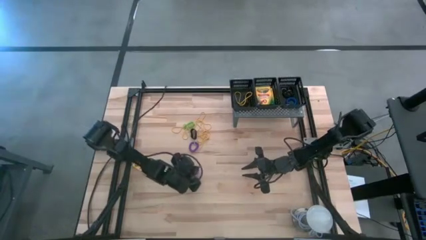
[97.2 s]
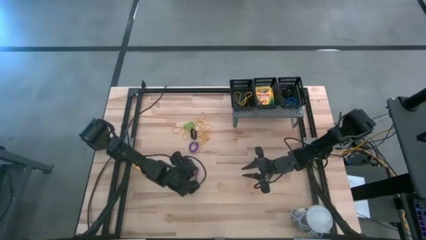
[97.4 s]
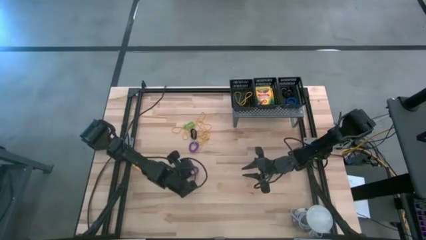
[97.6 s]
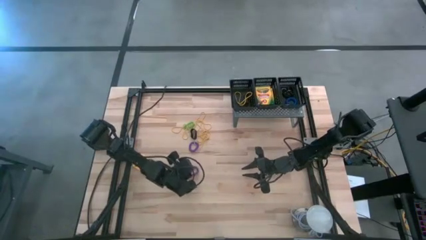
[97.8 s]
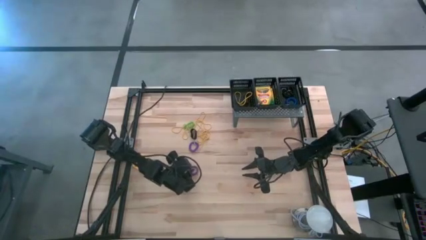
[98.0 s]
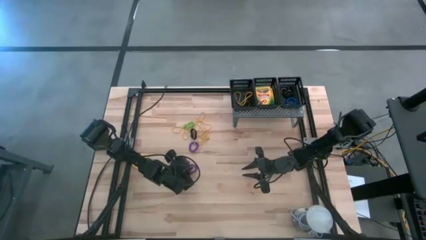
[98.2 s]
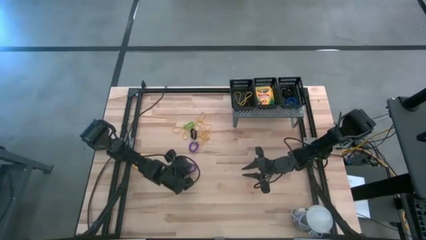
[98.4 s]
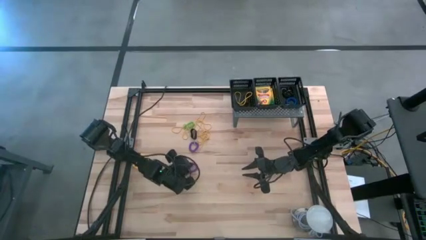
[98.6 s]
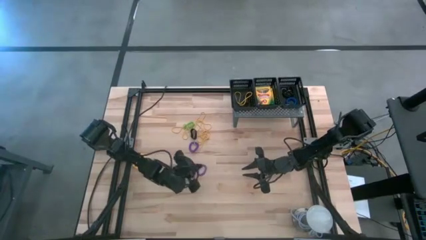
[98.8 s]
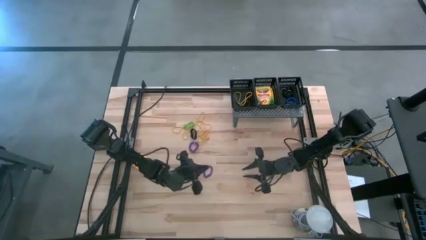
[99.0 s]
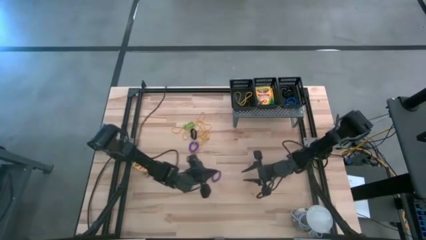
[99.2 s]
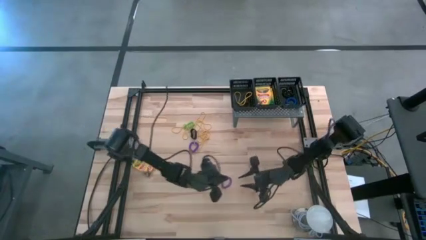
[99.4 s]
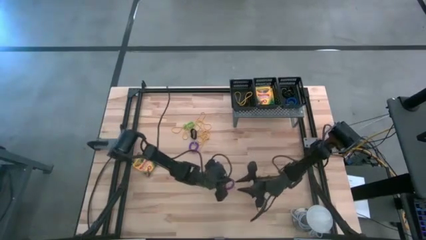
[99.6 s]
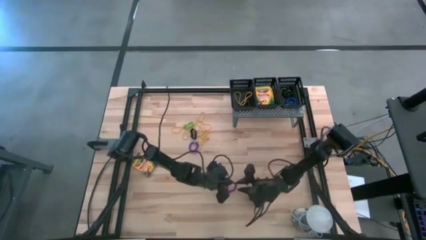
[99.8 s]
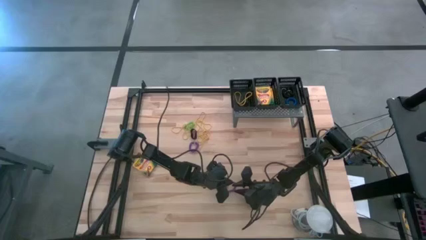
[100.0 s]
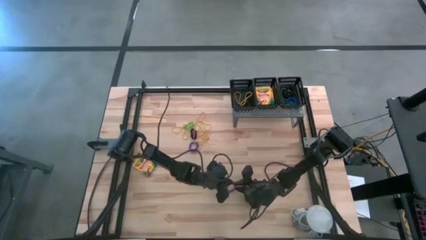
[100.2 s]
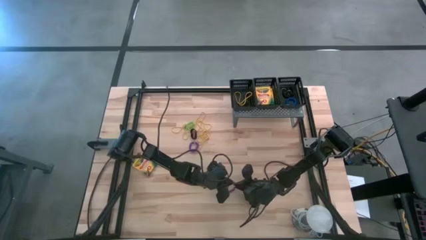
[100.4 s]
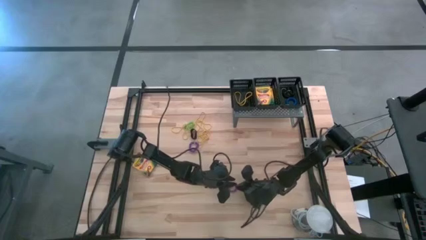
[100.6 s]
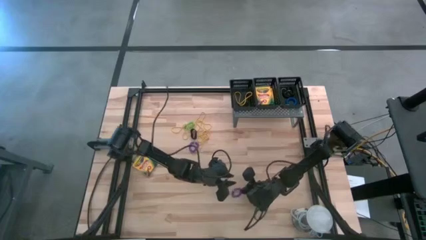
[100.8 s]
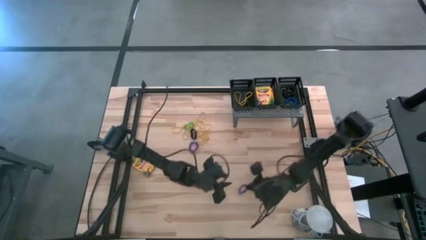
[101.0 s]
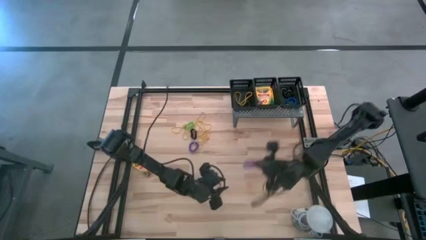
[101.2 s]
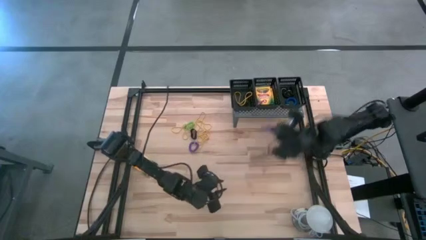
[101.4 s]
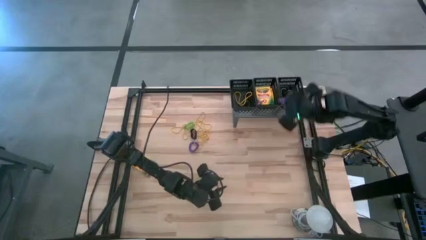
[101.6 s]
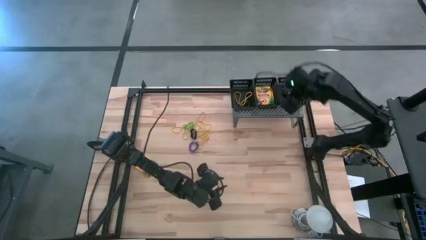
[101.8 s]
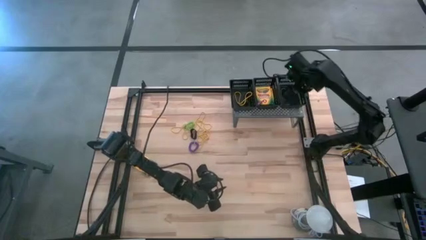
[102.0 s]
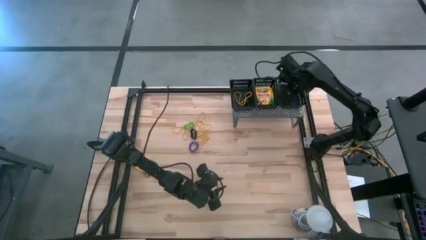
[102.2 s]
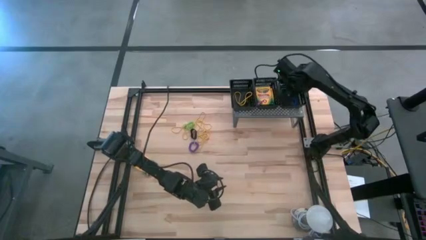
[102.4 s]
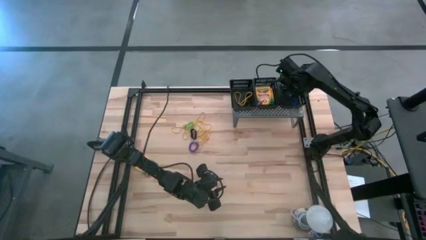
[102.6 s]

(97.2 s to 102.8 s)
Task: Pick & Place Office Desk Supplies
Put the purple spring keychain into the right black basket on the shelf

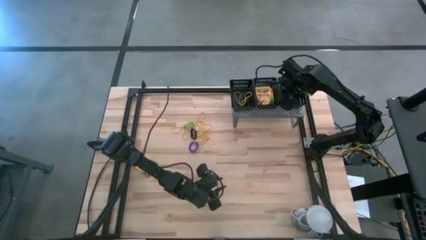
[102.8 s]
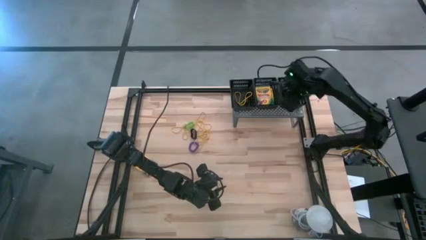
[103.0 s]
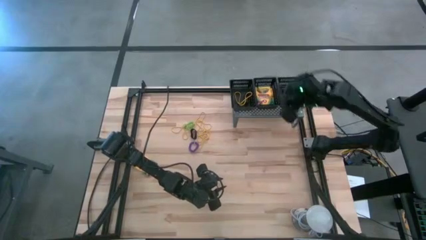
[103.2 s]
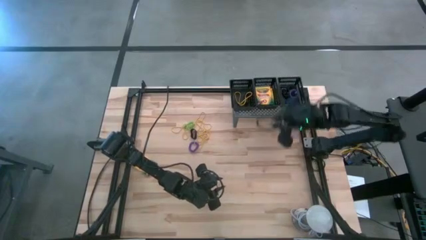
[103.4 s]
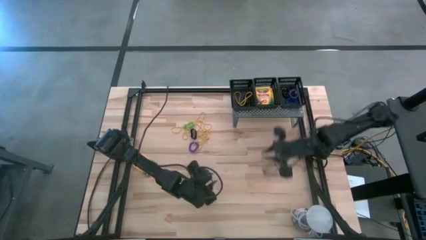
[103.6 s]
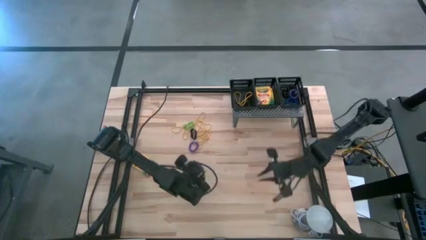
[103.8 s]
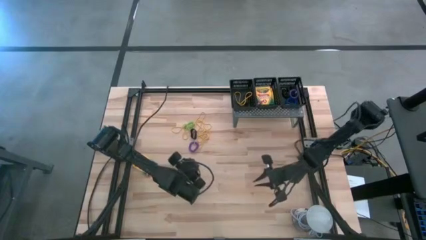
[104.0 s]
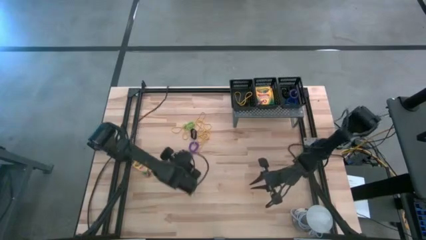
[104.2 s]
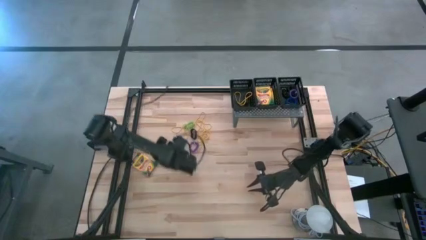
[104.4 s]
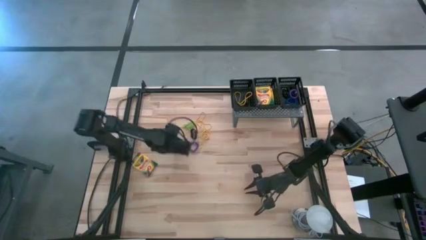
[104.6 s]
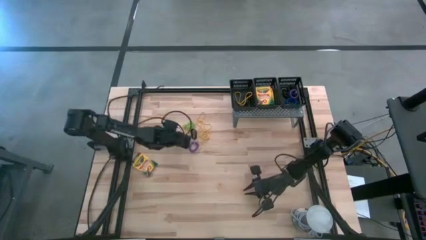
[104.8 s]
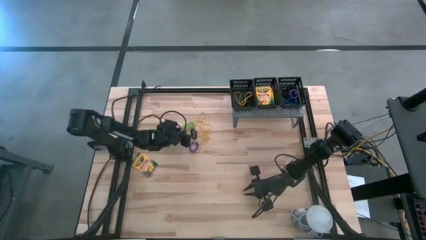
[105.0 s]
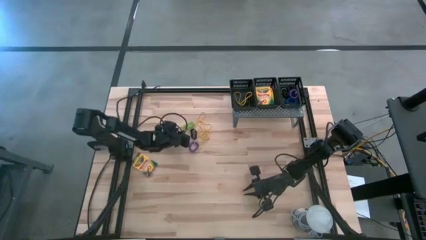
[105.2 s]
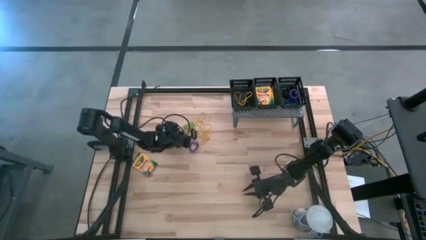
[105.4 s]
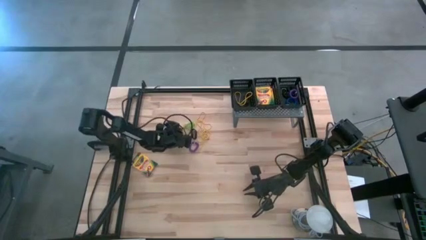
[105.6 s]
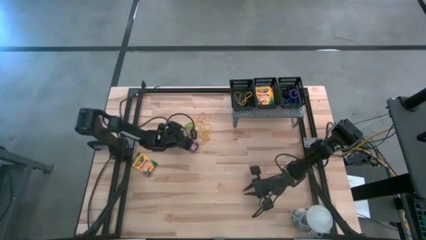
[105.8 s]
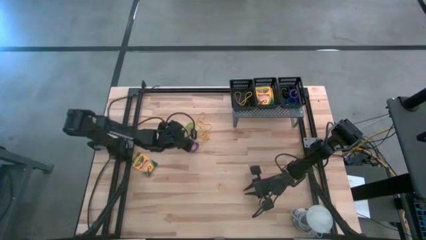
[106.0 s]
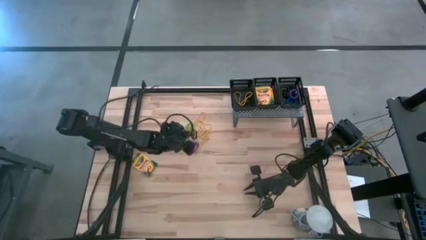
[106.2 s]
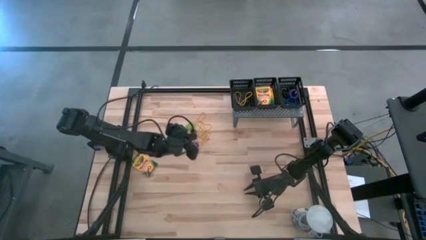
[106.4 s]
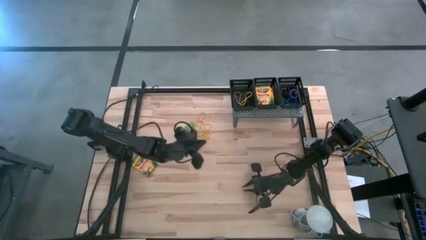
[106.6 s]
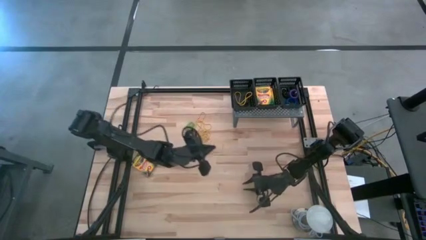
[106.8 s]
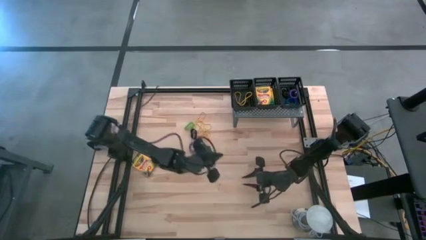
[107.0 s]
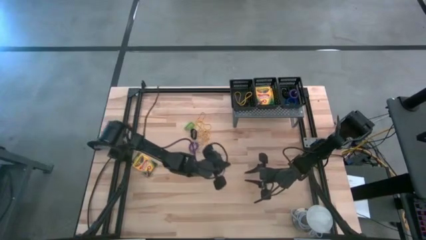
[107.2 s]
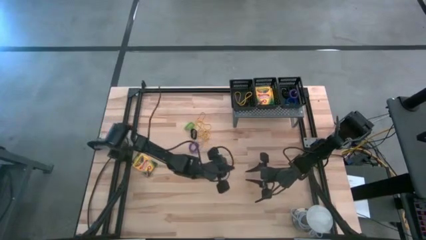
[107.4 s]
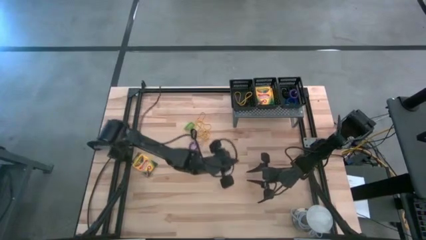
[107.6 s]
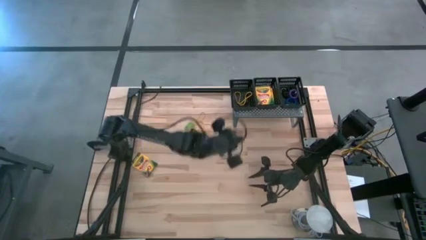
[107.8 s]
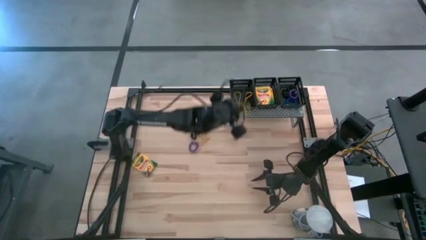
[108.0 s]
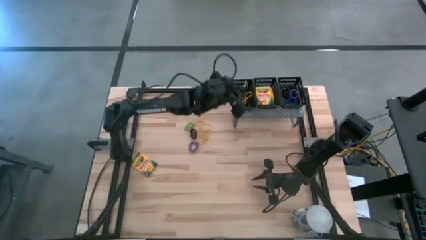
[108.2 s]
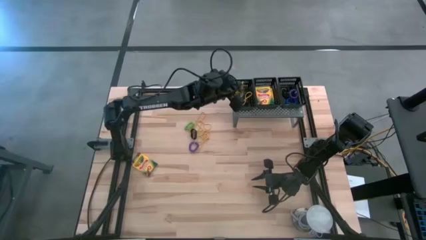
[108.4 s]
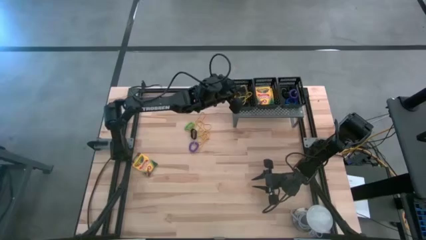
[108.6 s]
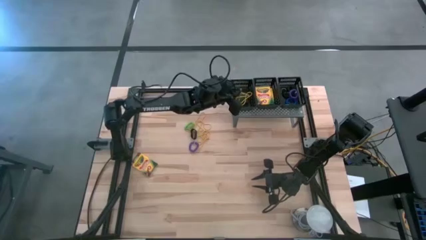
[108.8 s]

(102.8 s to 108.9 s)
Put the yellow rubber band into the left black basket on the shelf

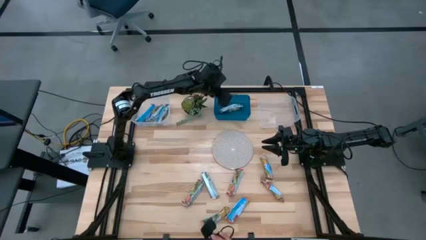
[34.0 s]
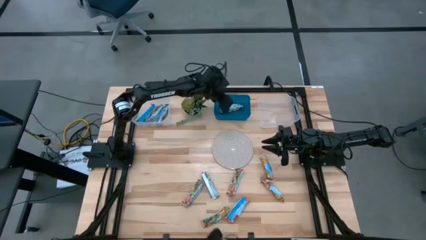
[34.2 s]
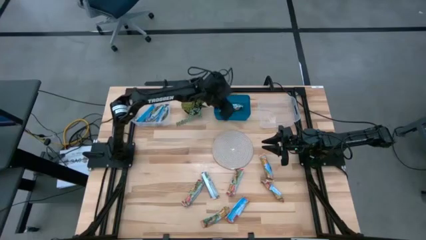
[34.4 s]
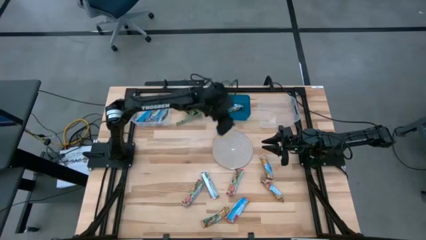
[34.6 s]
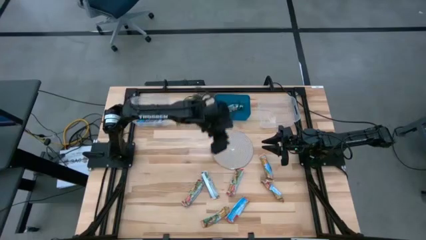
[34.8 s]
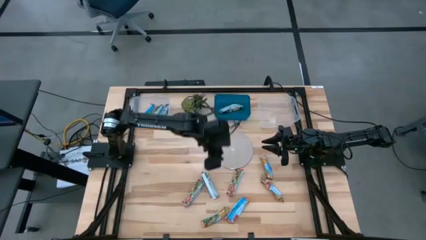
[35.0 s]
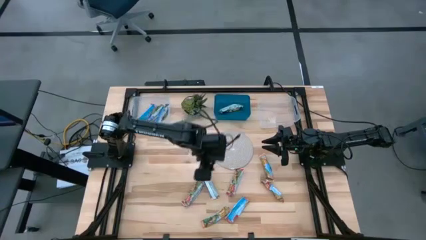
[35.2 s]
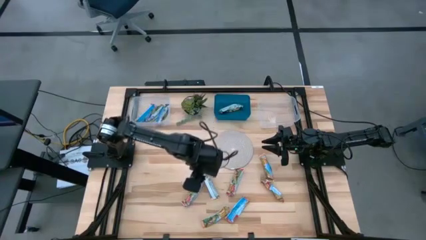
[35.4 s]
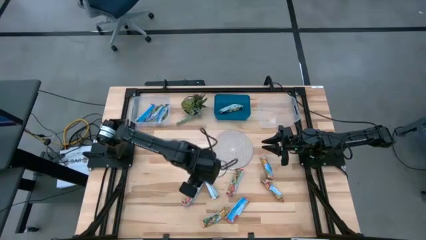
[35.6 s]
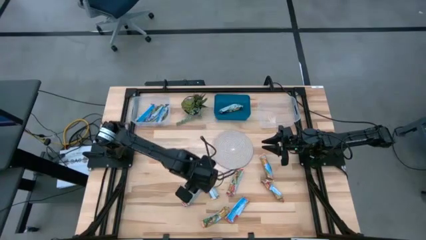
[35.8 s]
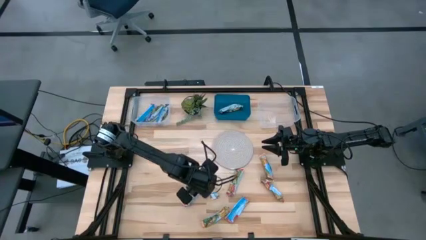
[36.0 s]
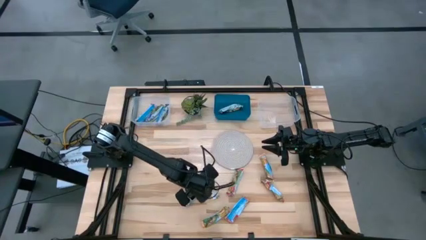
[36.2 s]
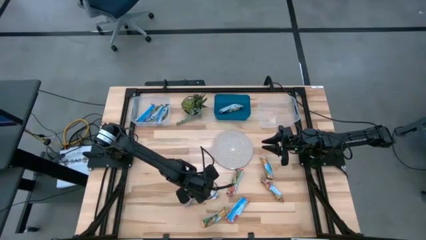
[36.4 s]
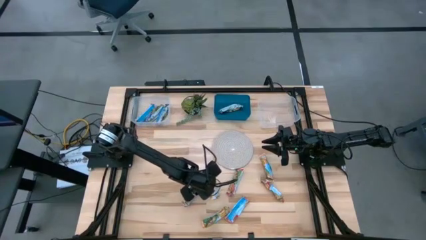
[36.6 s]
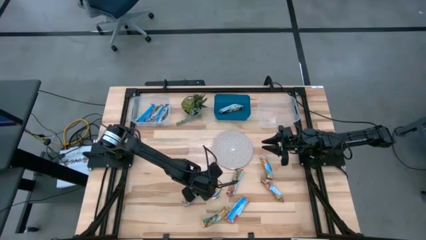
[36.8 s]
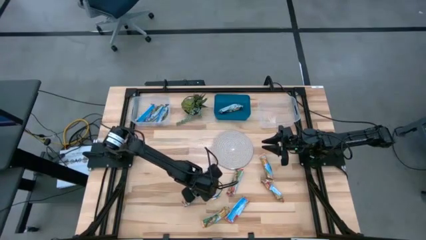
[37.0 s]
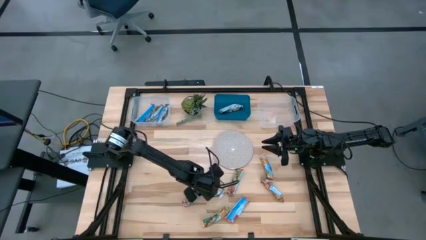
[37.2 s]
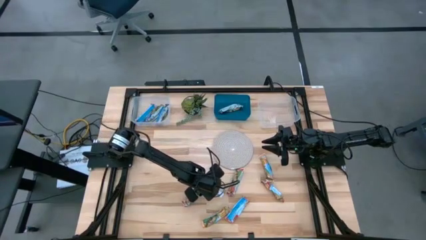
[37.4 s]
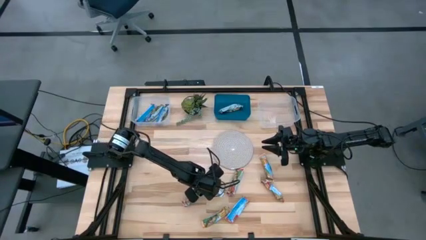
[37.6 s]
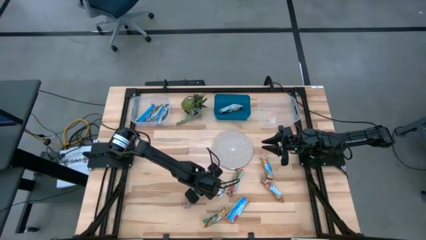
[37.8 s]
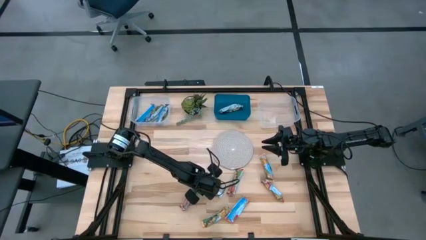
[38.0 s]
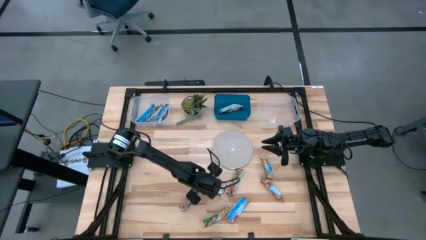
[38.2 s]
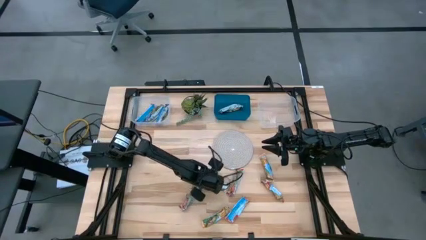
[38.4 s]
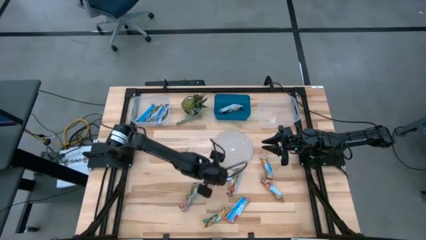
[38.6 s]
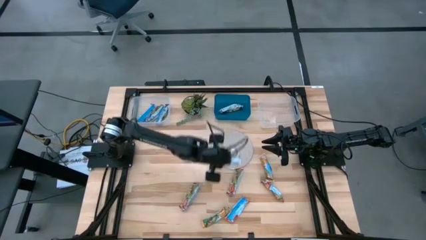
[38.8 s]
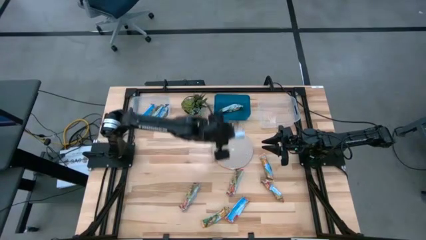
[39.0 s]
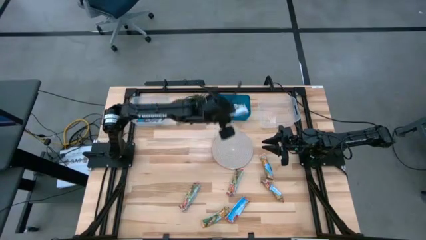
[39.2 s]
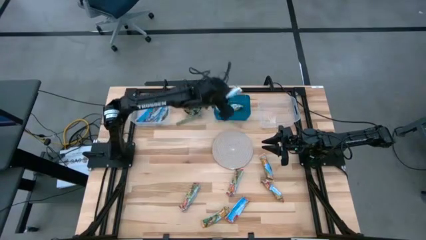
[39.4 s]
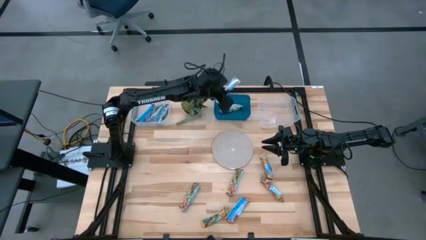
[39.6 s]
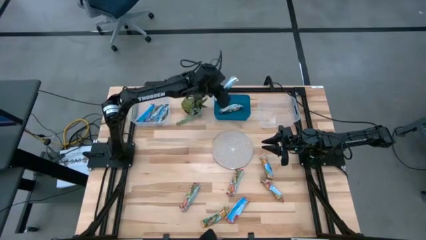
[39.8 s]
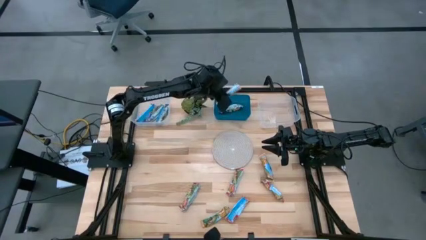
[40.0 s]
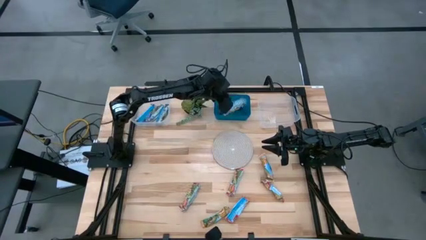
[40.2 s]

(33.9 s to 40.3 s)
Task: Pick and place Granola Bars by type
Put the yellow granola bar into the blue bin
